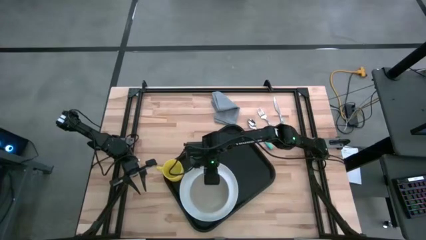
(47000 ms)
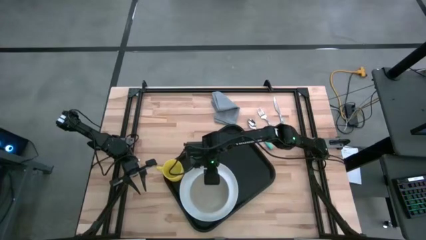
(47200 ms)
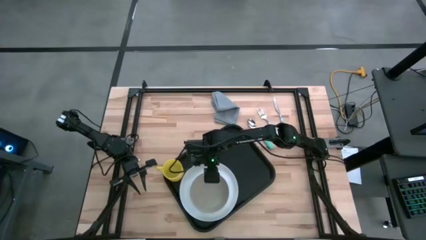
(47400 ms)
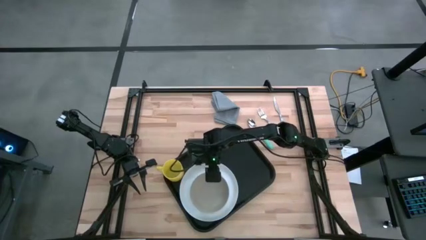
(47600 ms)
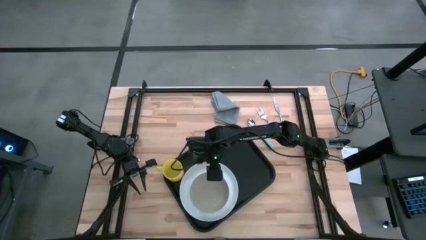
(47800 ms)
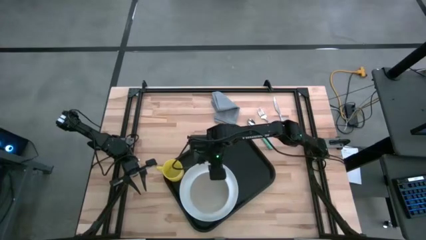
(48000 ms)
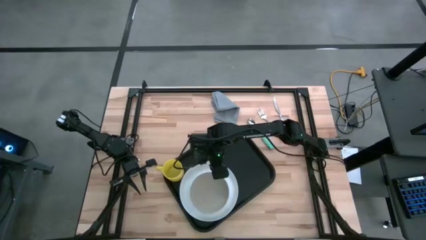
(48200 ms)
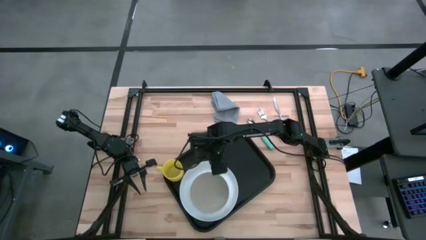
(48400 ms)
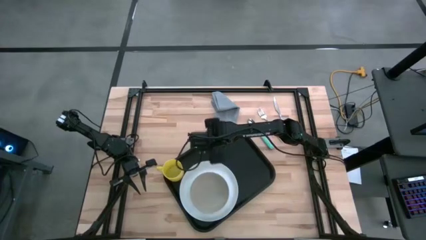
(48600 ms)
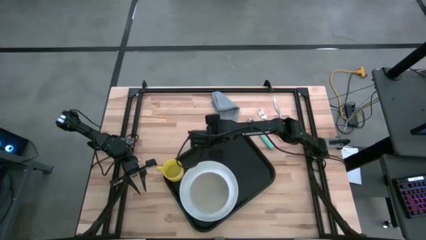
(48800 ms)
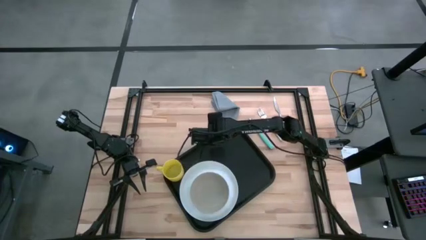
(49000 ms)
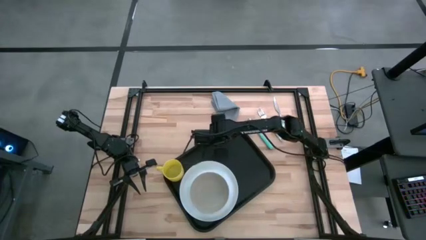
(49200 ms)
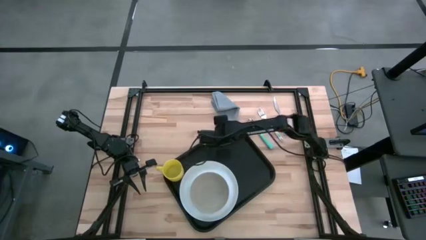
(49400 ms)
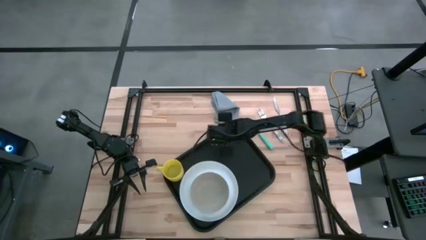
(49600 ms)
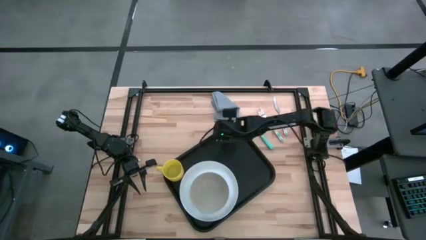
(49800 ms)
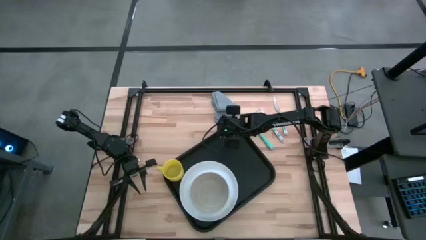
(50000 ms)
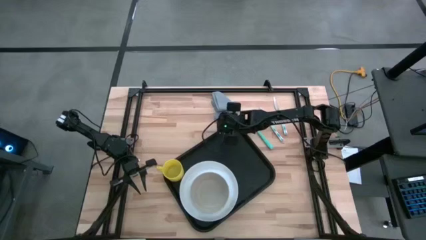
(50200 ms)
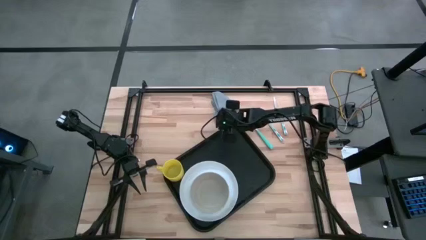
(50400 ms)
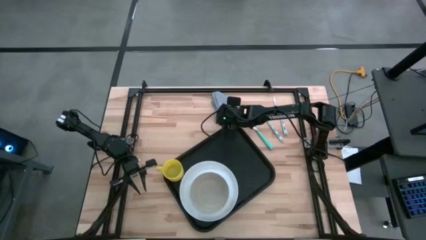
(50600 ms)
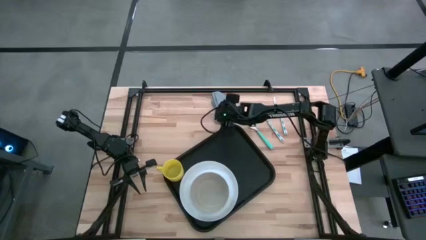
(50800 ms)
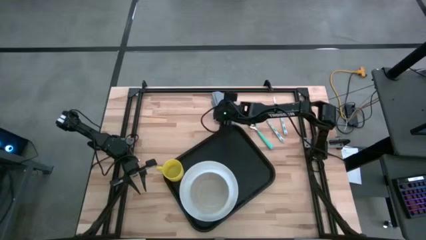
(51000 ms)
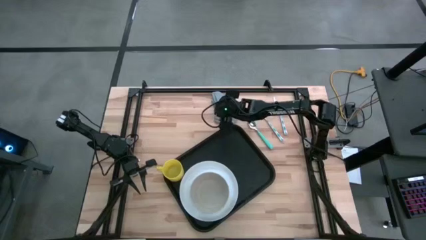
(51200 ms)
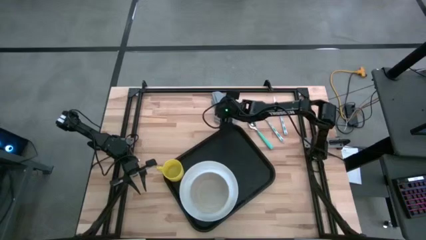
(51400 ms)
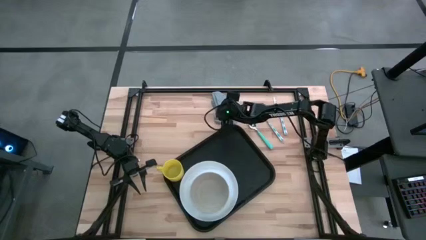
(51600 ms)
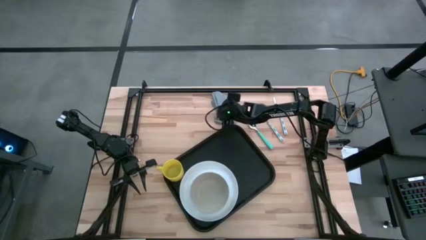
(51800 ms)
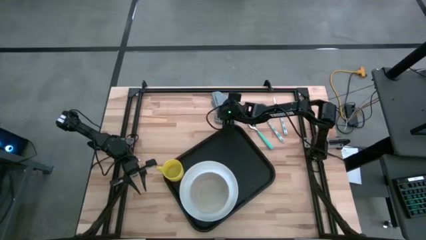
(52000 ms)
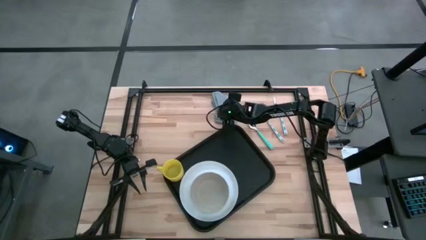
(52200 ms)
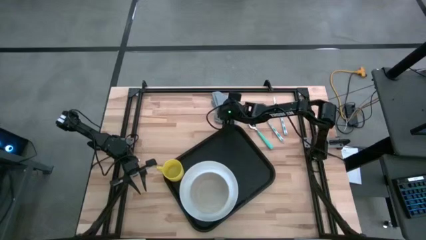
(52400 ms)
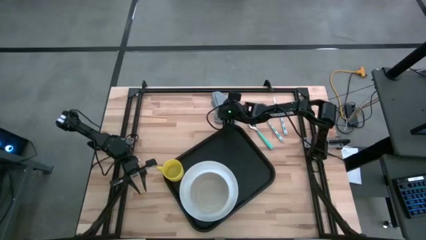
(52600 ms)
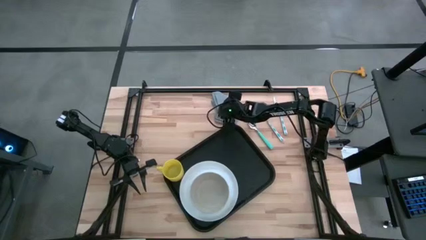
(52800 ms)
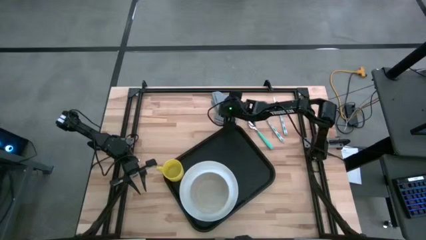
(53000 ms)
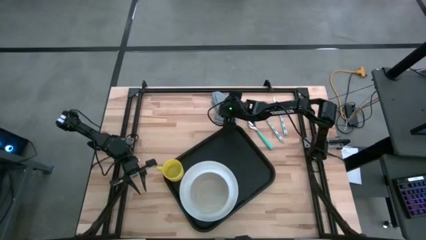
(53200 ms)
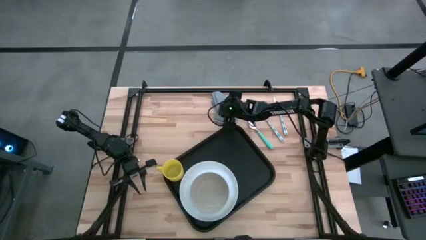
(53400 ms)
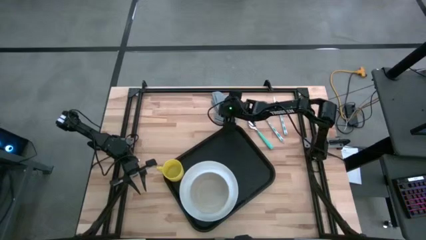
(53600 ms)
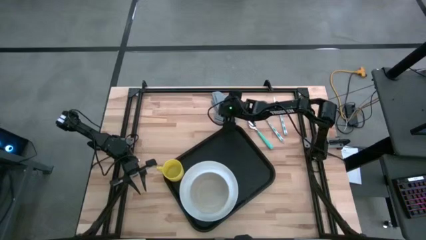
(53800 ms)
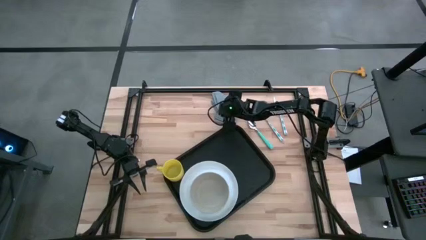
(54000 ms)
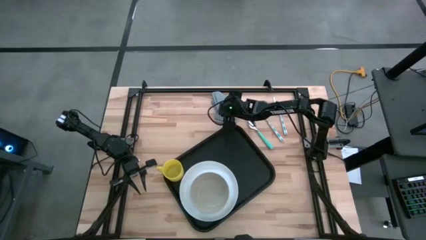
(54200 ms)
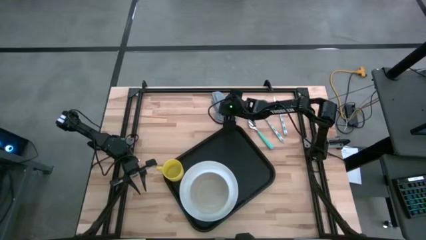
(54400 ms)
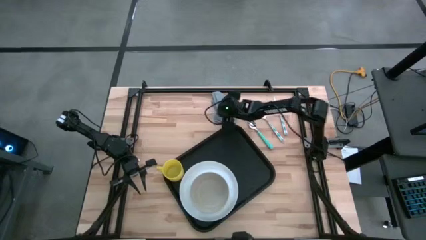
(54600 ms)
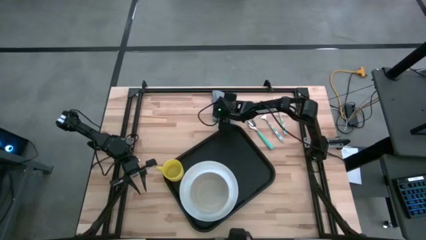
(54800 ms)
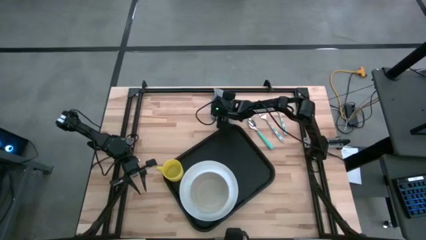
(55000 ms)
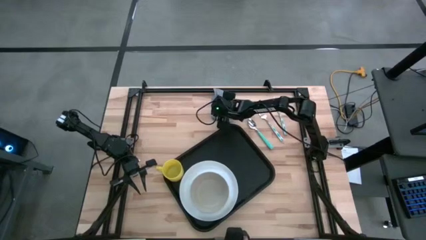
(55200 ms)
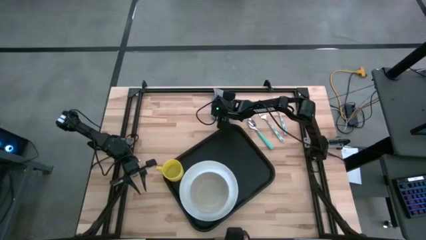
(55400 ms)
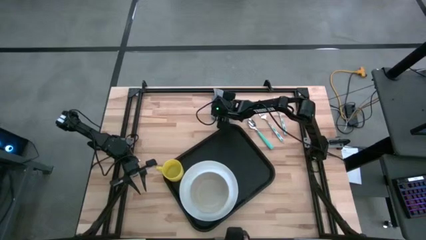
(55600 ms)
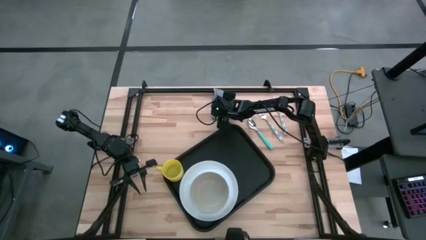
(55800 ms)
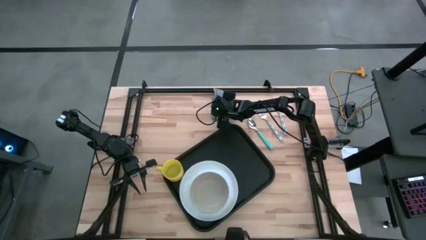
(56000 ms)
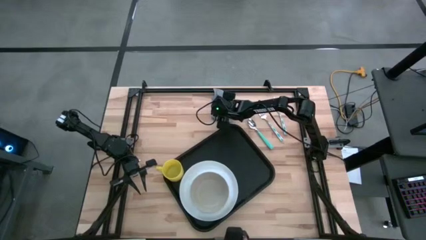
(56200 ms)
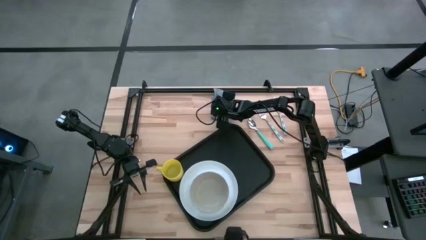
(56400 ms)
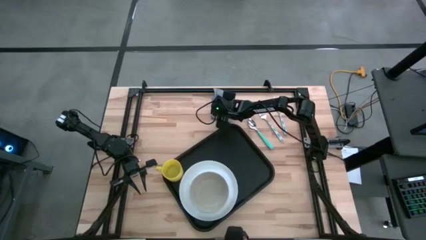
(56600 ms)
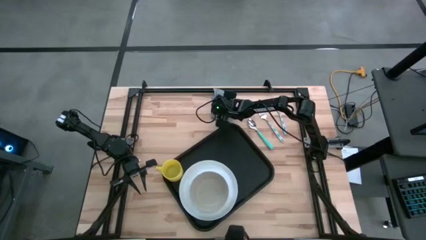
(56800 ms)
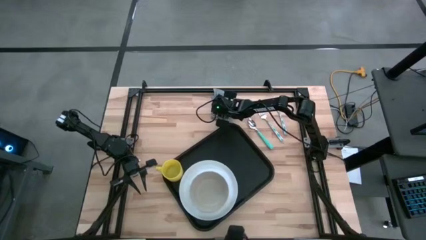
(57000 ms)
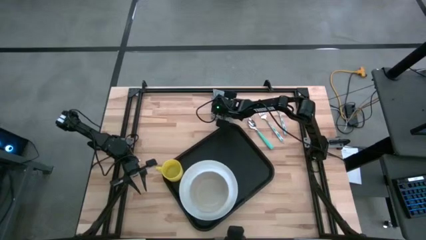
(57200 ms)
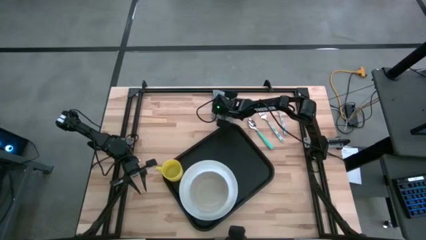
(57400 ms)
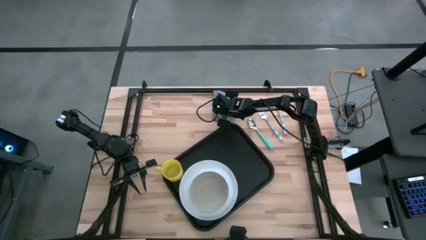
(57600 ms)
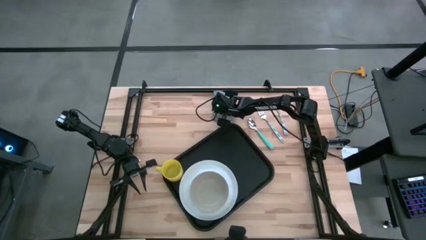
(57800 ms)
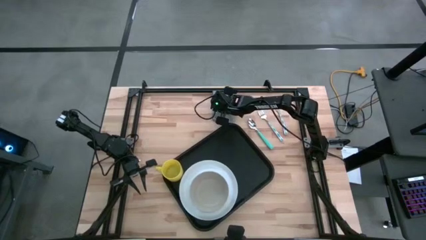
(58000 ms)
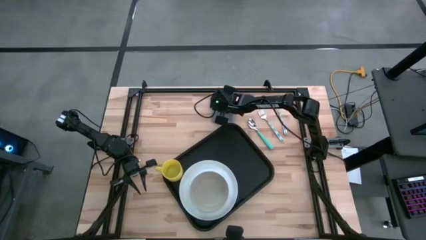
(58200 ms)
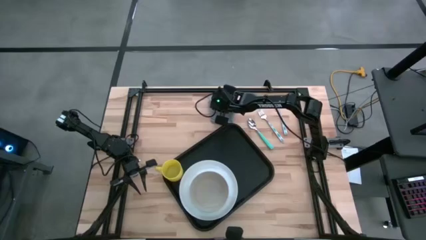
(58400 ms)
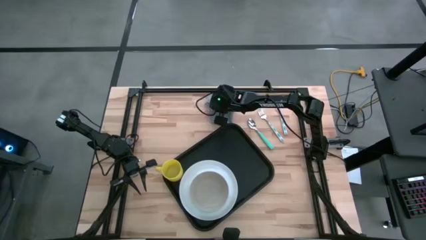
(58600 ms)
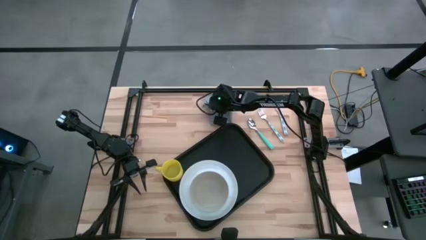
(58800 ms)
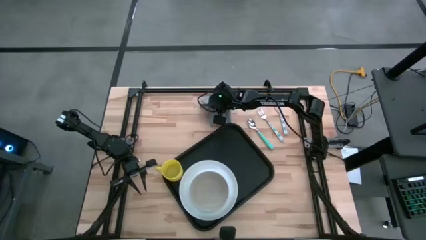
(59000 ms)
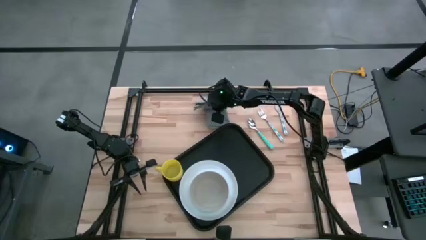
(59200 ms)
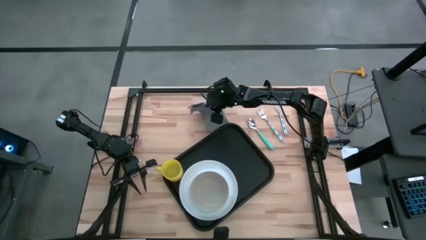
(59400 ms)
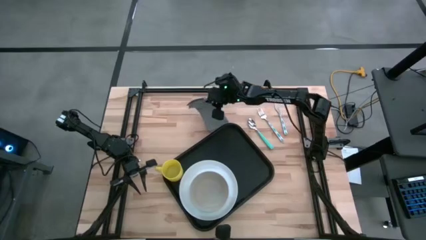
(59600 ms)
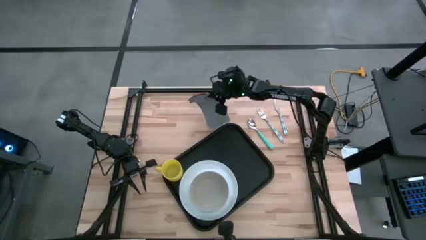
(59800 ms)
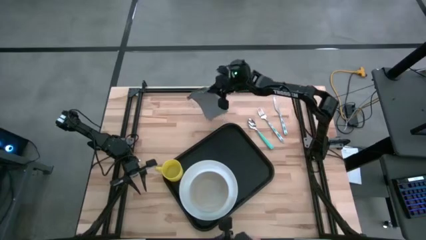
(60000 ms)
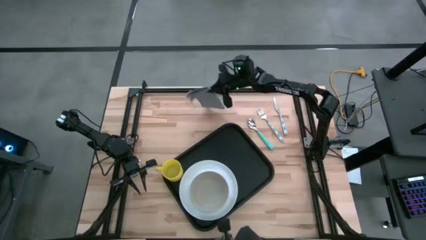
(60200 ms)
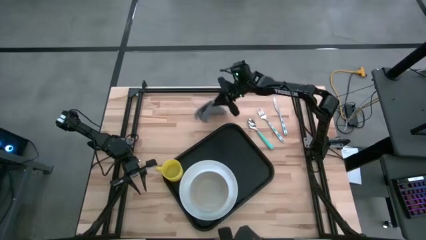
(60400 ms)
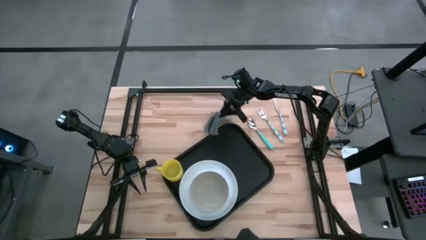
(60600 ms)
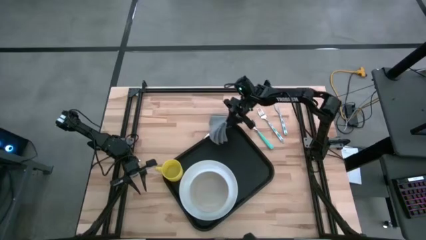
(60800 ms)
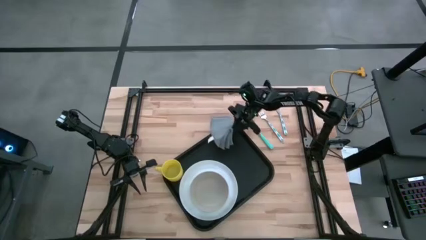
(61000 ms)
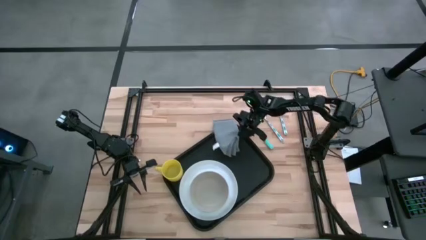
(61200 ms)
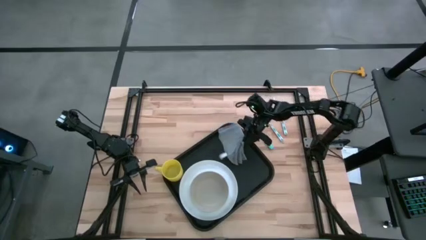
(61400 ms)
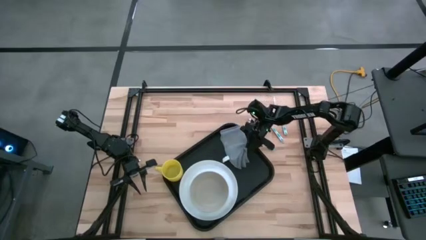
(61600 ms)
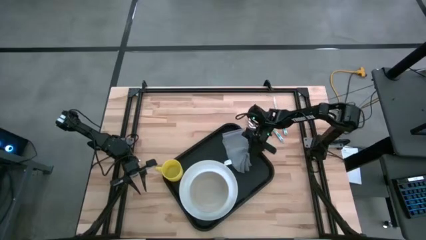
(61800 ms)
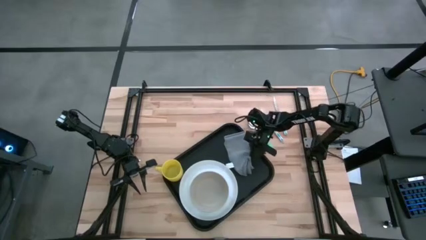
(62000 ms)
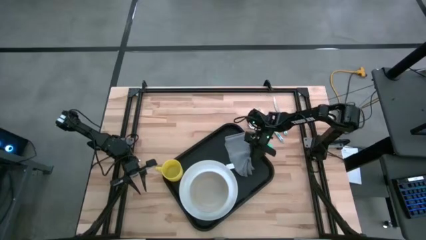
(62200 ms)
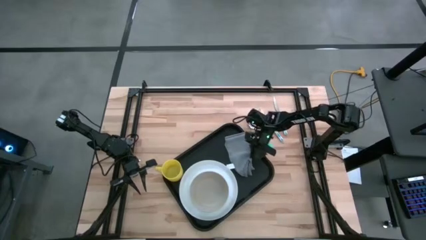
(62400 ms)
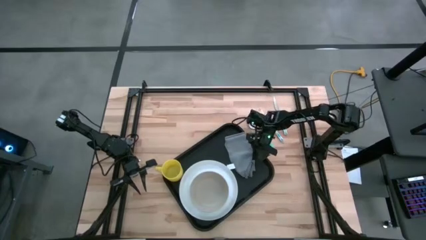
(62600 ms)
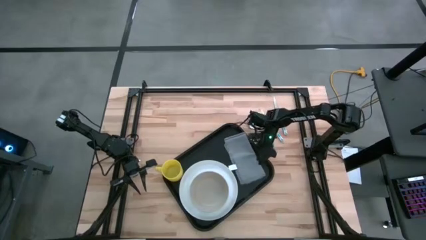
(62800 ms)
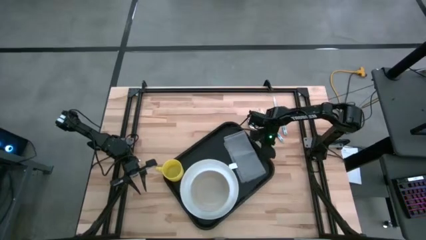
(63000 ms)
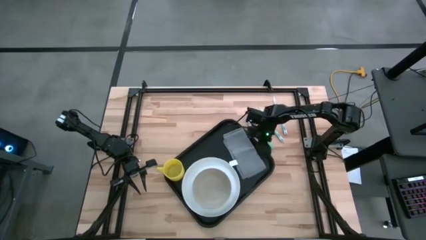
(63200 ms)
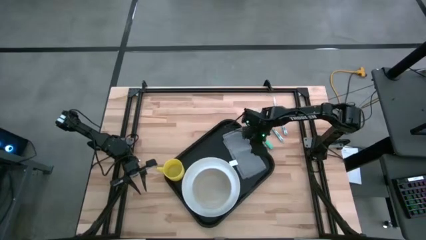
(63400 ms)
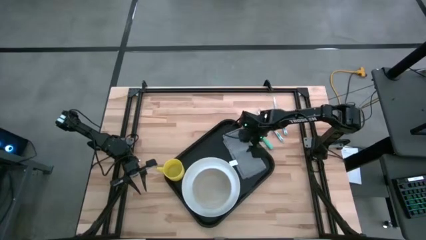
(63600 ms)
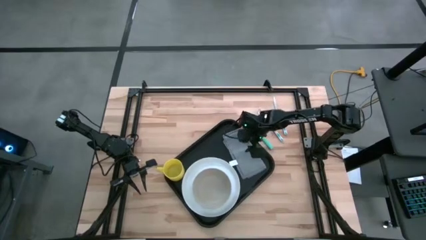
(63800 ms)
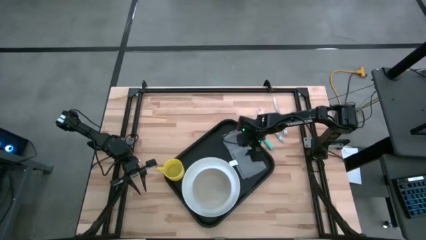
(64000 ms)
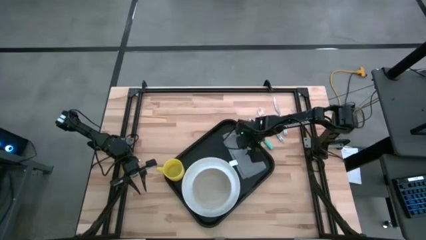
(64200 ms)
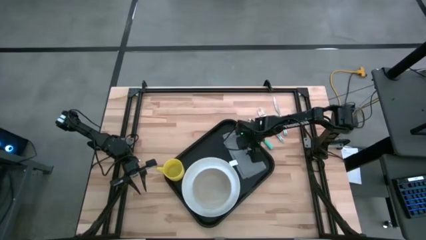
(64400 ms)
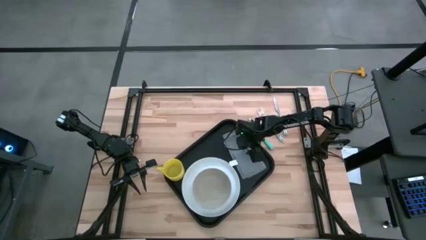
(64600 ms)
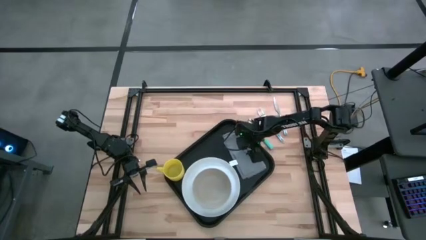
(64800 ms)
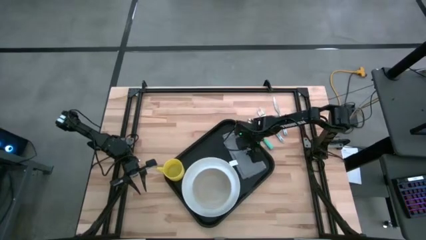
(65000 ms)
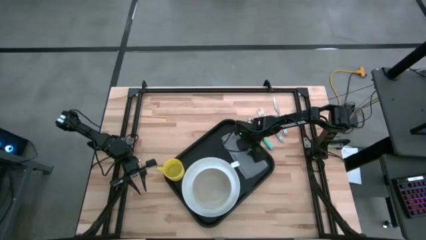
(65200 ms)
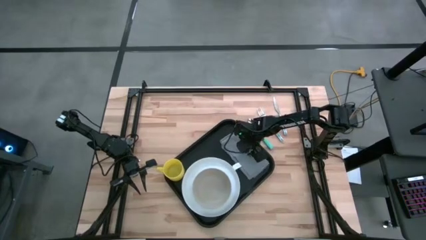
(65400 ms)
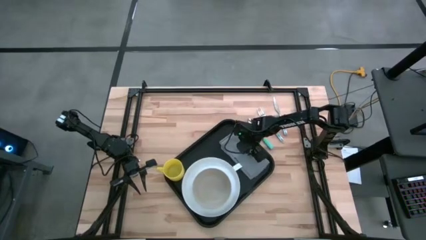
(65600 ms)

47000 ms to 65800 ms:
Task: Set up tray
Put the gray napkin on the black tray to the right of the white plate
